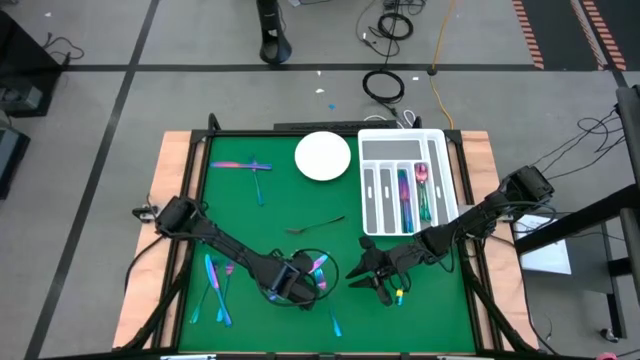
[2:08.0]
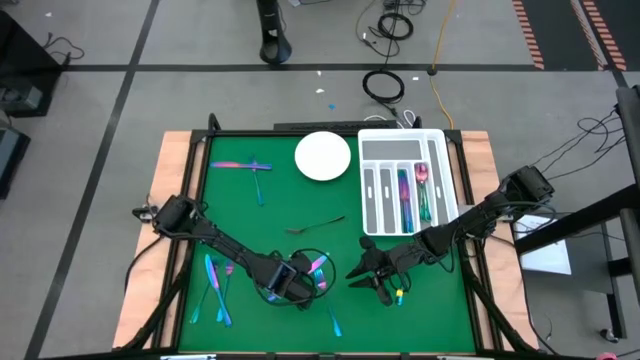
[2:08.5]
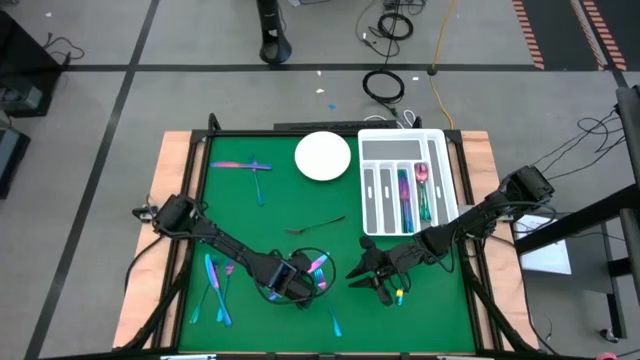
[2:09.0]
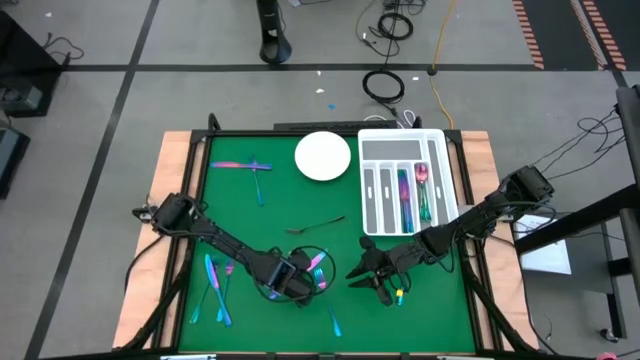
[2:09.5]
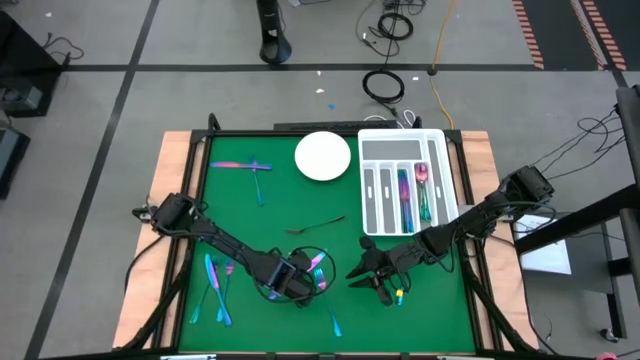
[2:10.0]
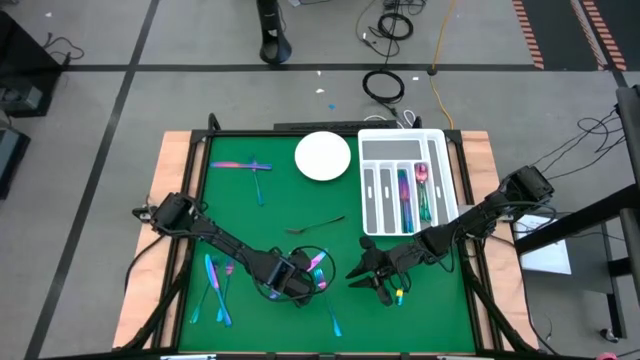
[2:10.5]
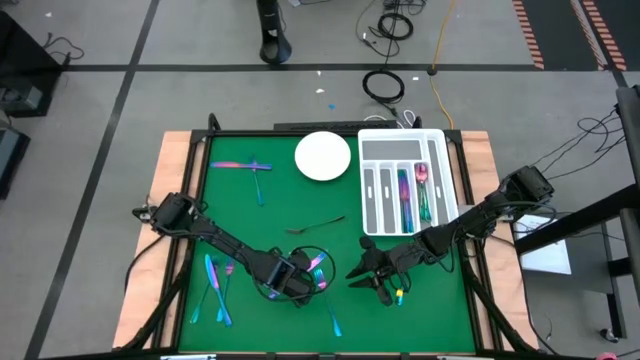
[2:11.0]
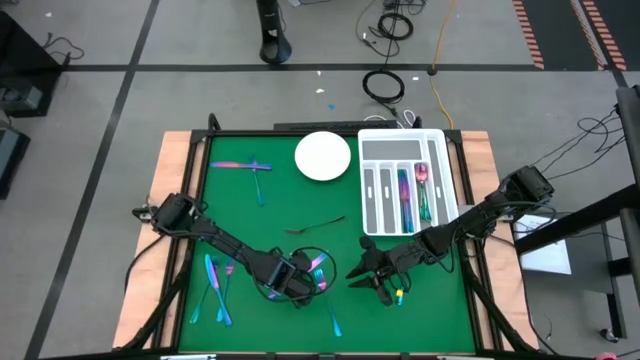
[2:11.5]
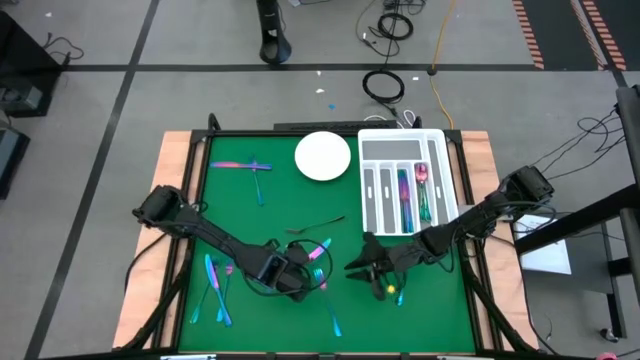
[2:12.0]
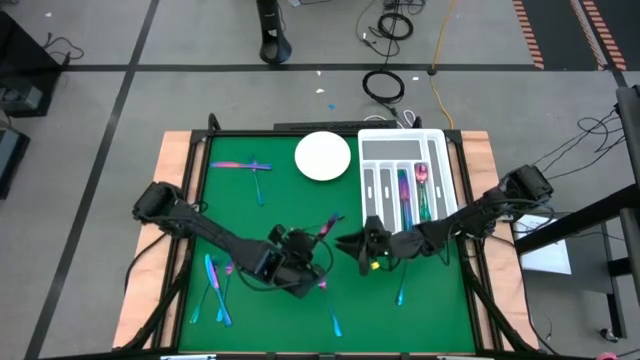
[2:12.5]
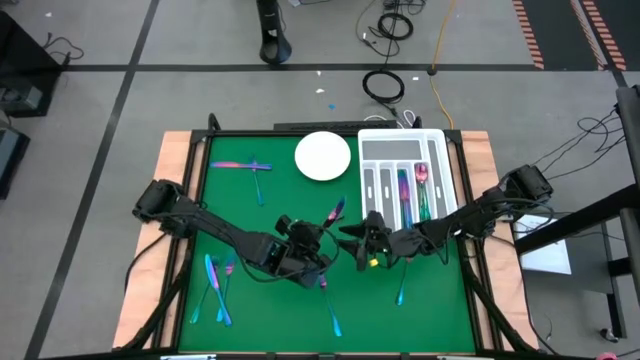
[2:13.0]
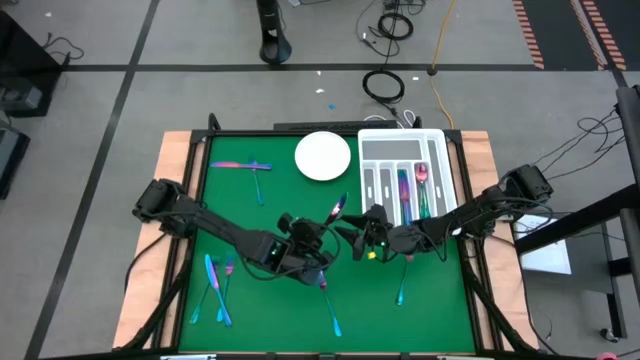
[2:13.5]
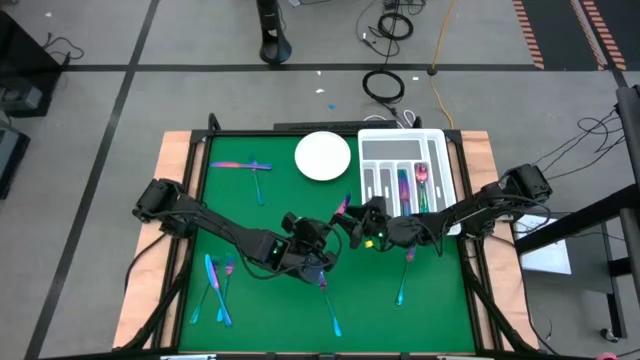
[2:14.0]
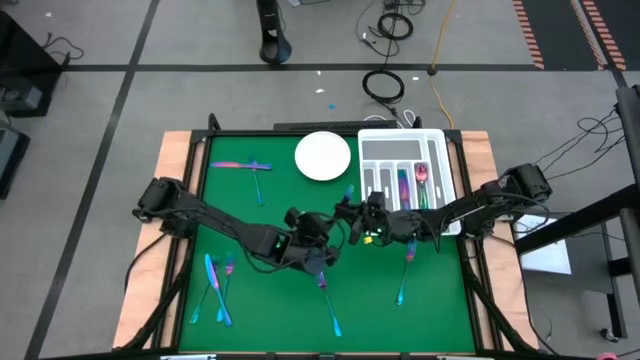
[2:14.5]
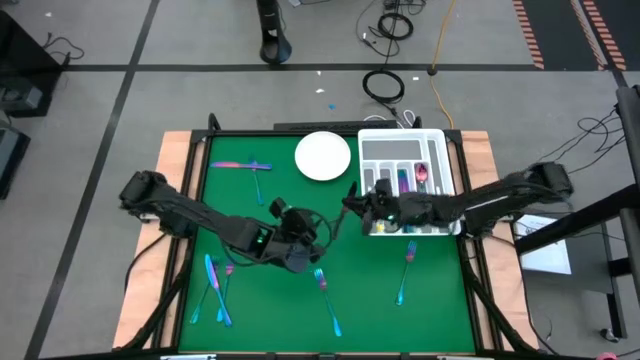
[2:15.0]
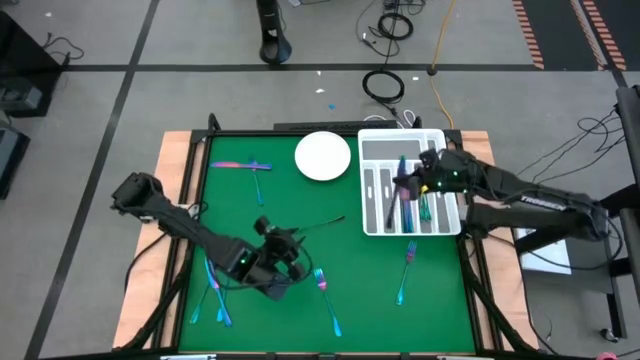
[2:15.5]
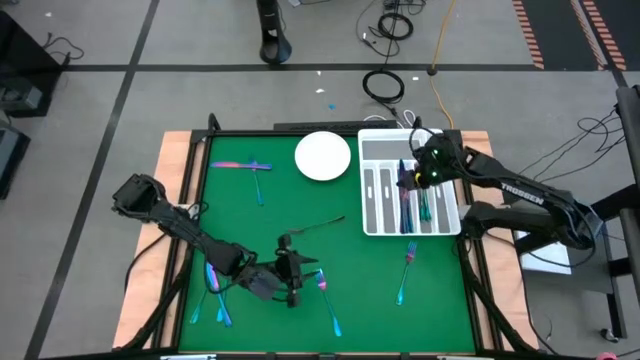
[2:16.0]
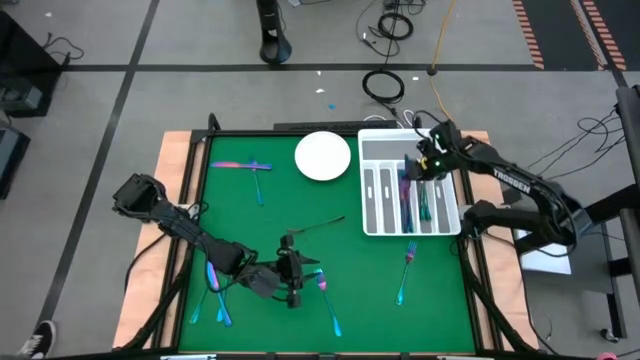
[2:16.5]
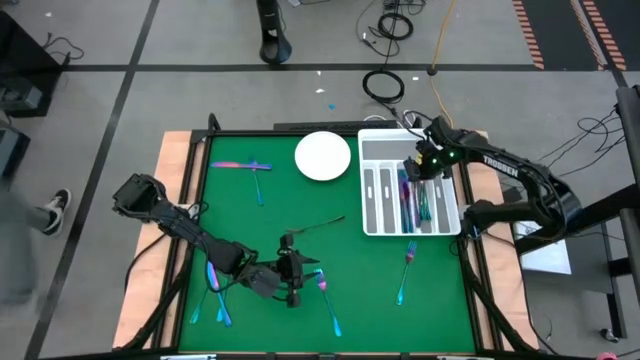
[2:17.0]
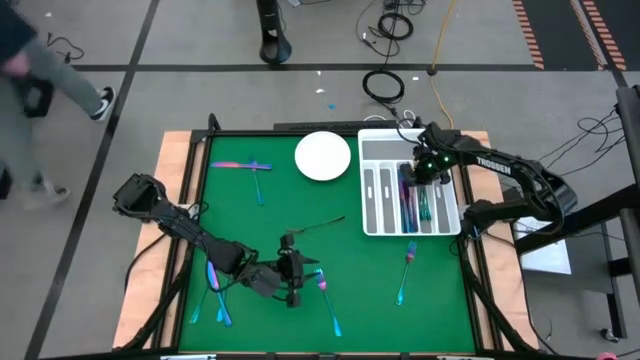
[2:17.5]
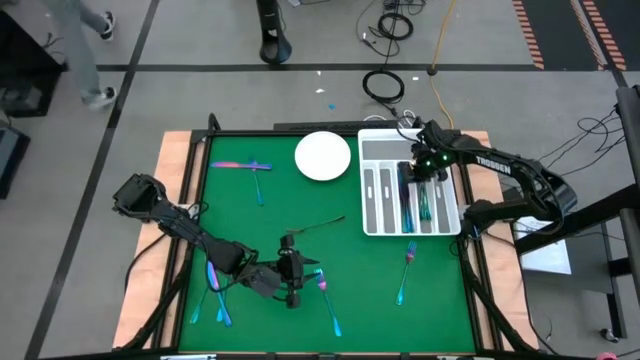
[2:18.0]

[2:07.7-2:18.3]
Task: Sort silverware
Put the iridescent knife into the white silverware tray

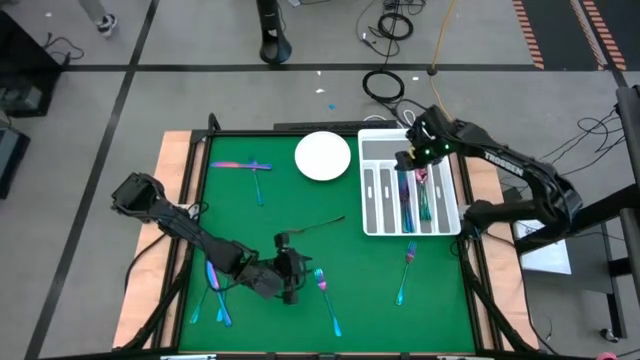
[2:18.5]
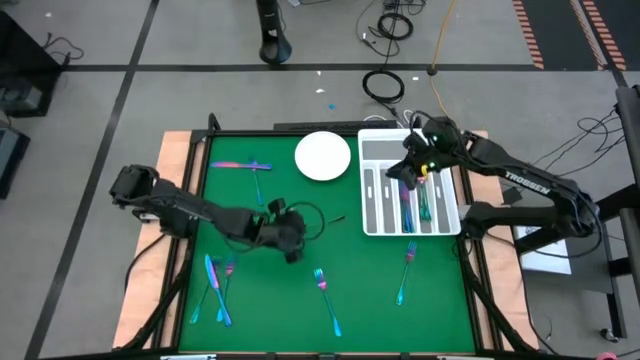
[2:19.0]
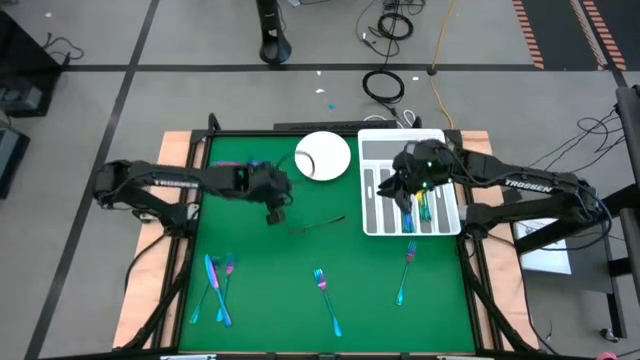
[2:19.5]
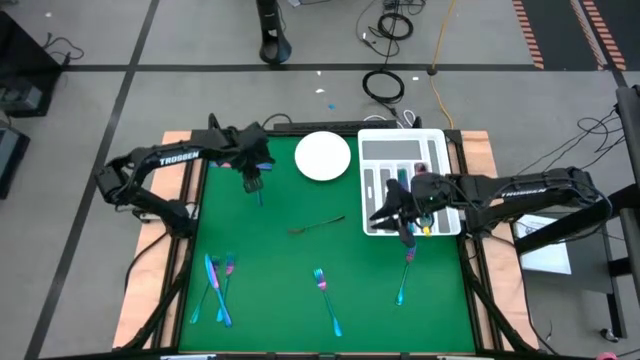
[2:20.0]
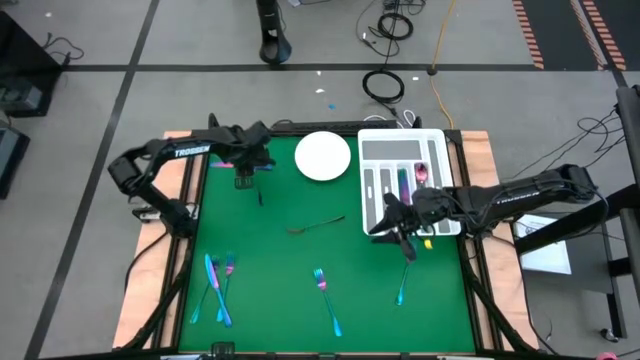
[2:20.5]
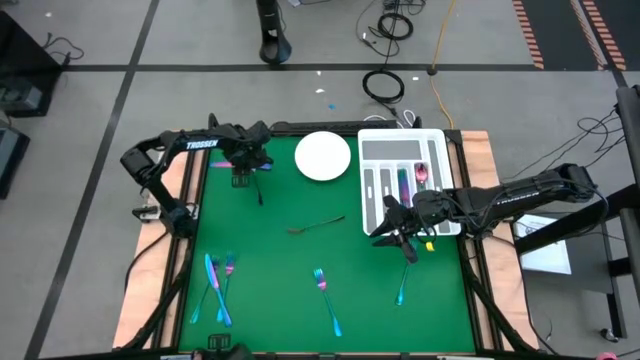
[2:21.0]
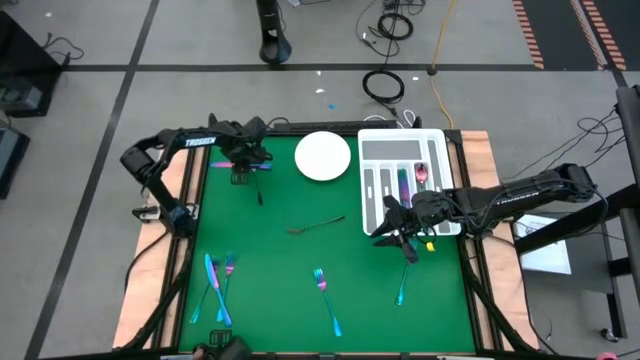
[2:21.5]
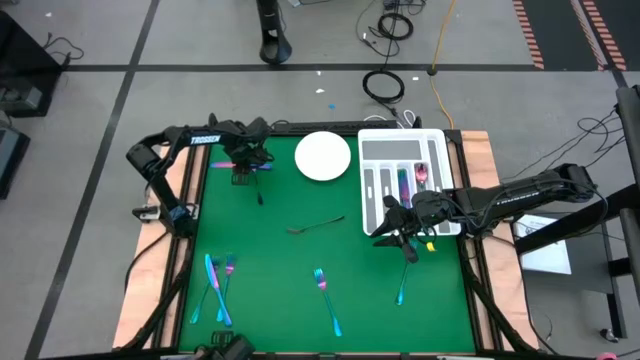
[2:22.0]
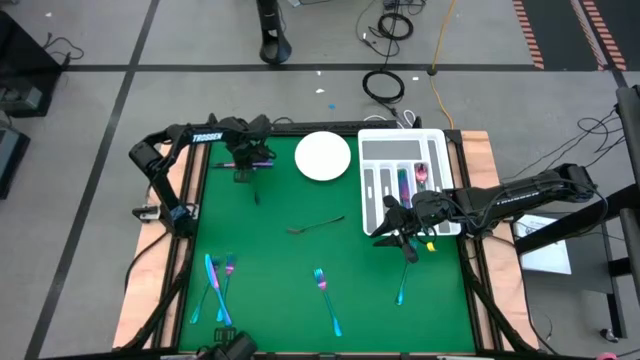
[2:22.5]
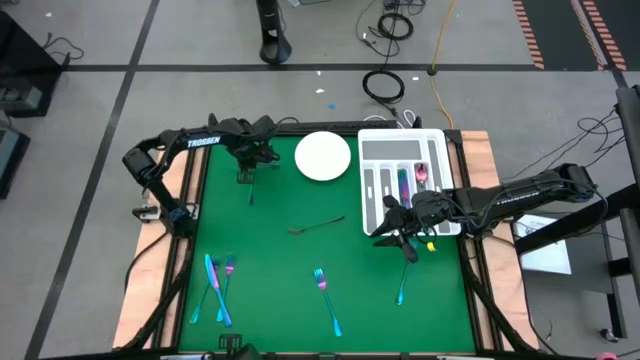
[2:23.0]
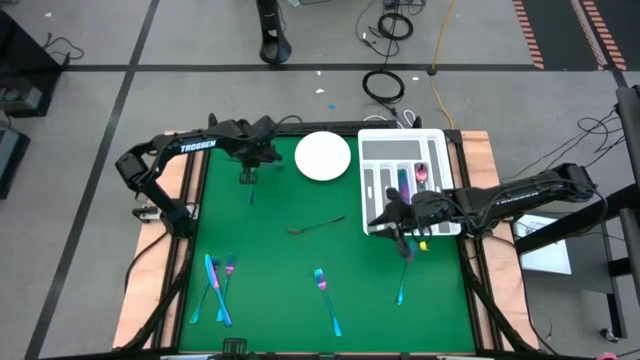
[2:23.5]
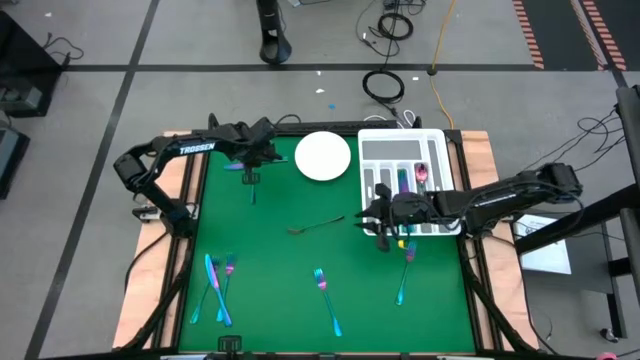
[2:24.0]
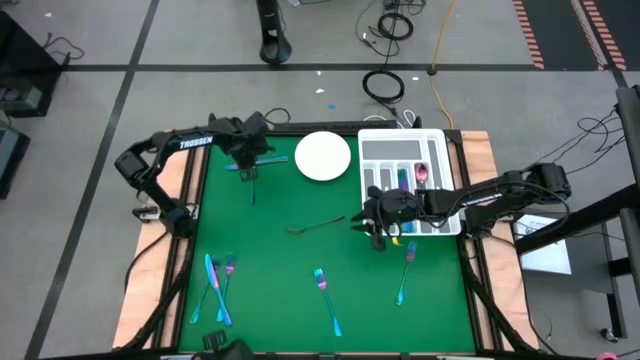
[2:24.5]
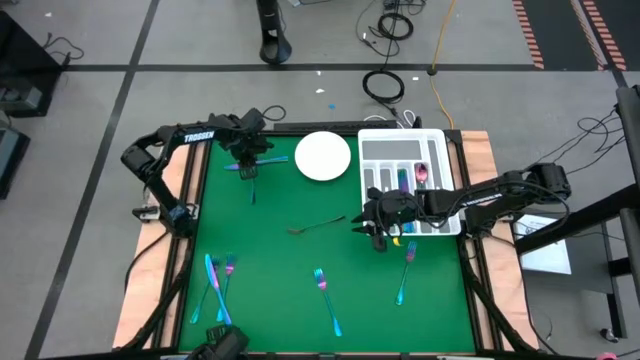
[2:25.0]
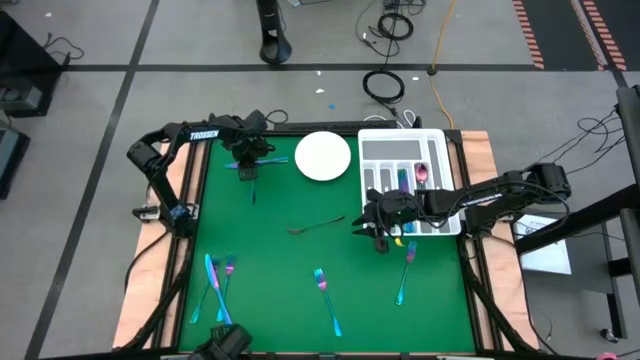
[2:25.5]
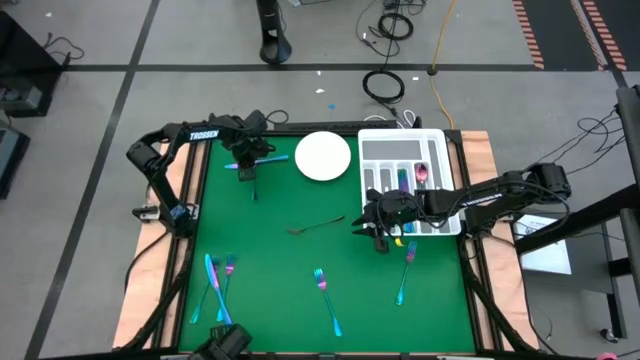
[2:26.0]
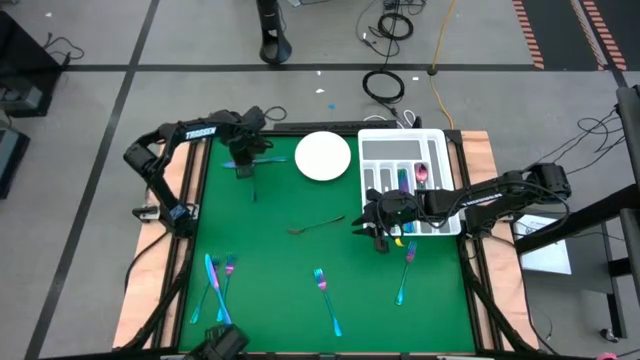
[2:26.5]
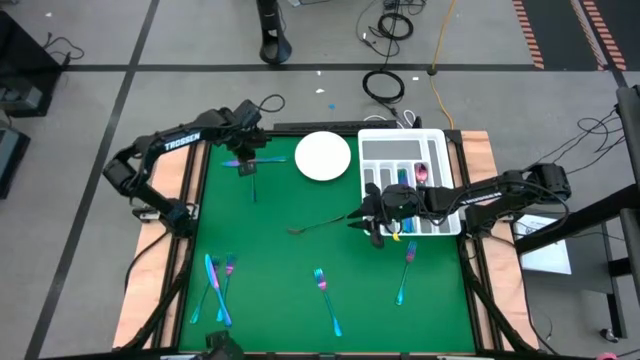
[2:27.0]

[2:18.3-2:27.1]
Put the iridescent knife into the white silverware tray

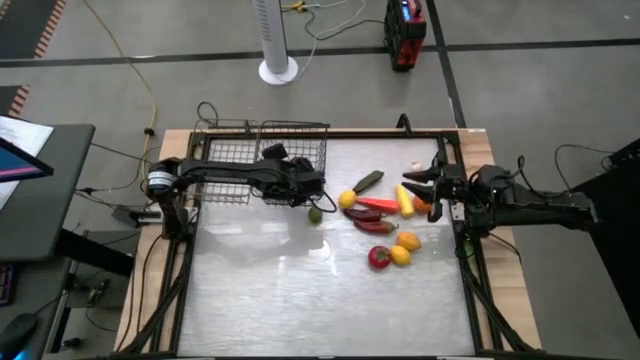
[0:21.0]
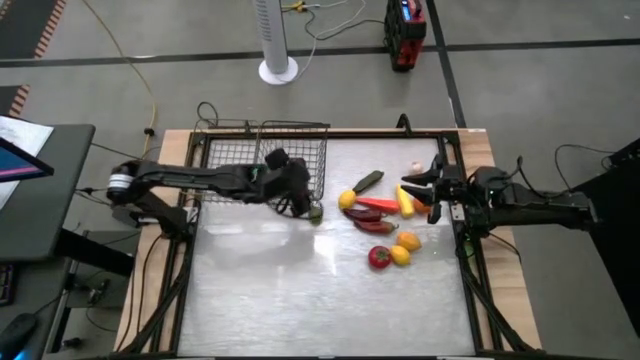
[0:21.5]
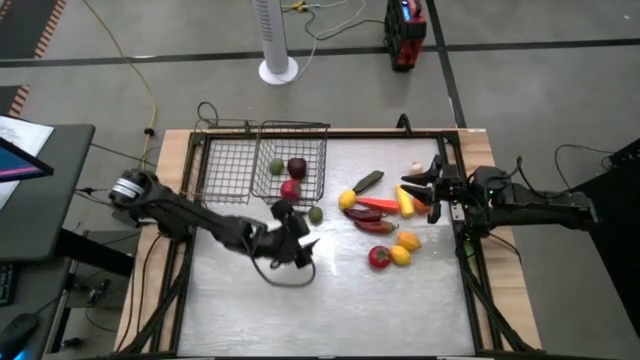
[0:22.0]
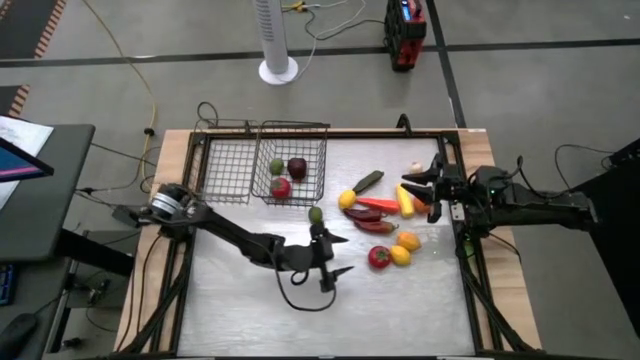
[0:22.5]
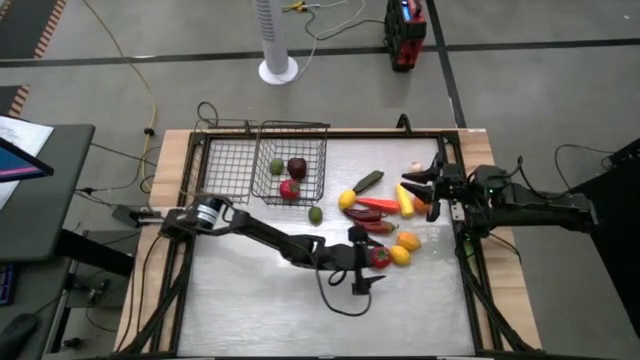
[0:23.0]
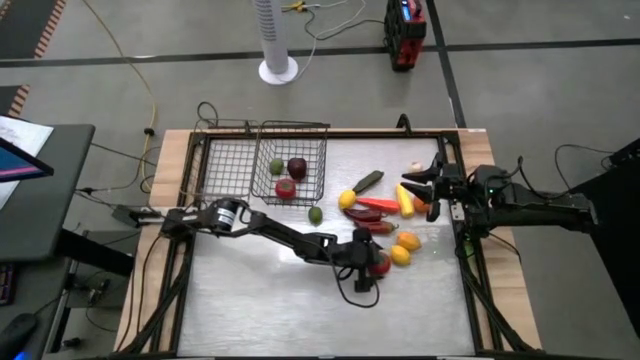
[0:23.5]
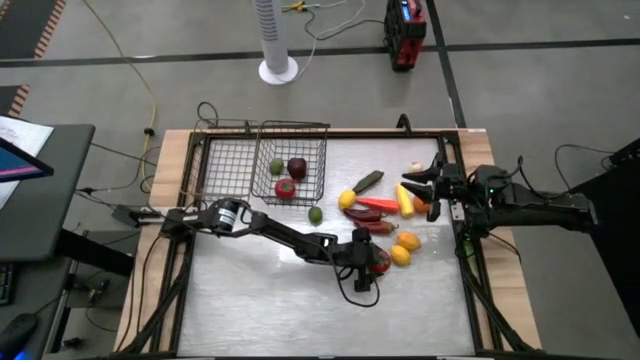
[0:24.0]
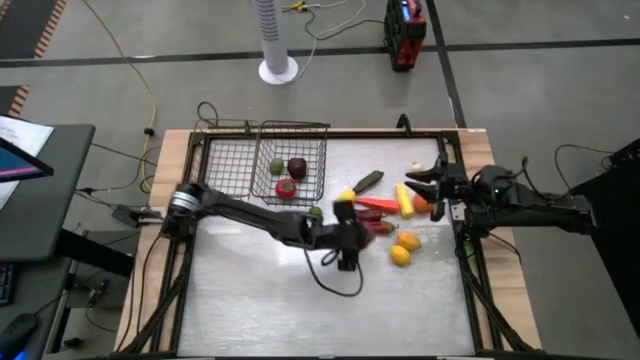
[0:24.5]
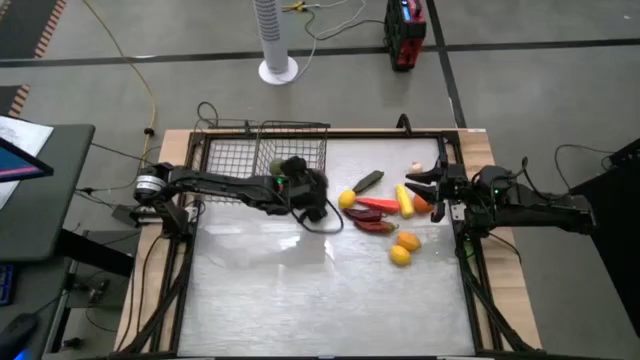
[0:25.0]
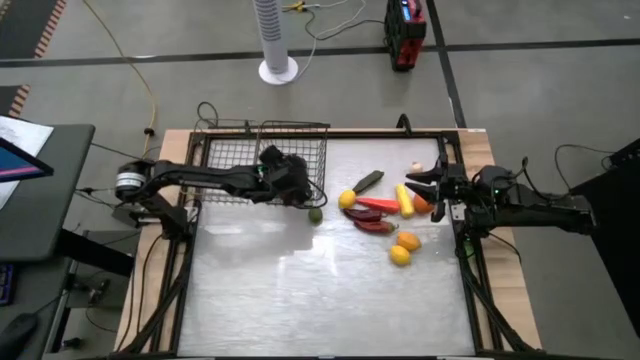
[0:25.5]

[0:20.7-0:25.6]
Task: Sort produce into baskets
Put the red tomato into the right wire basket
